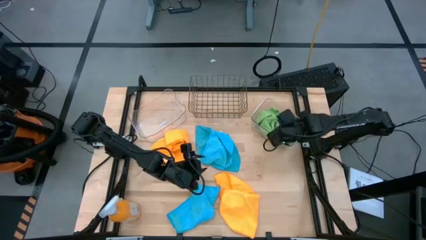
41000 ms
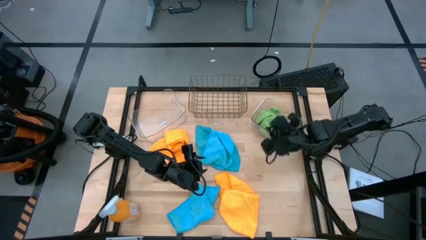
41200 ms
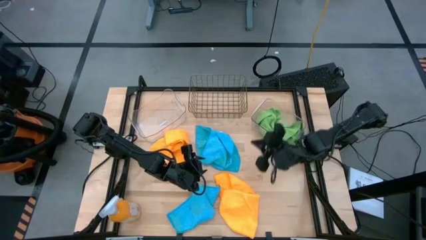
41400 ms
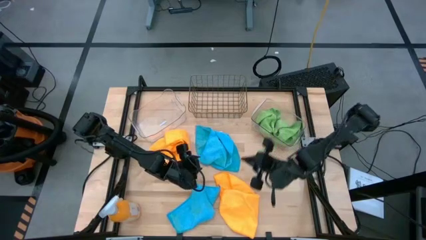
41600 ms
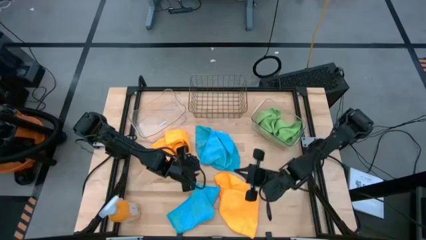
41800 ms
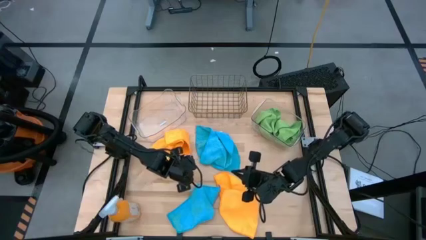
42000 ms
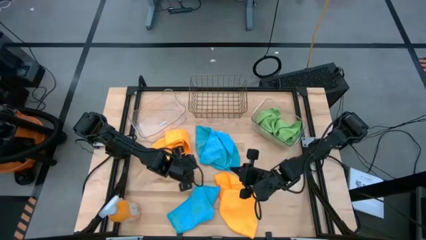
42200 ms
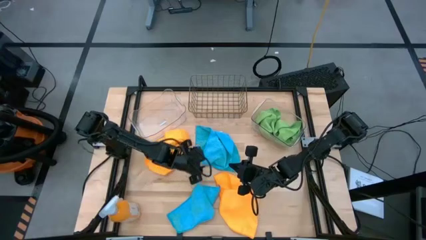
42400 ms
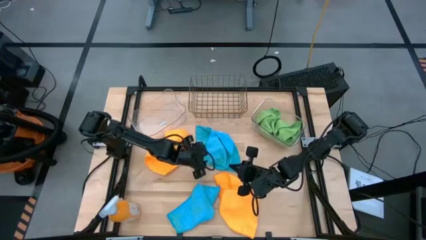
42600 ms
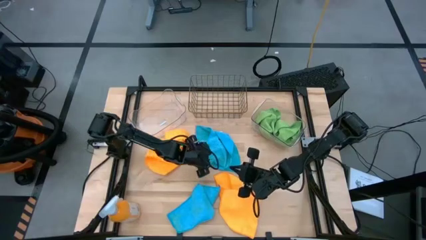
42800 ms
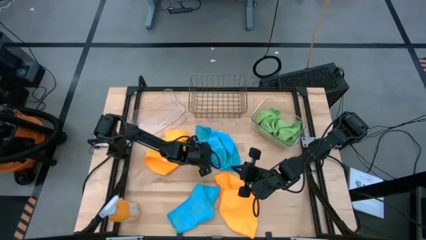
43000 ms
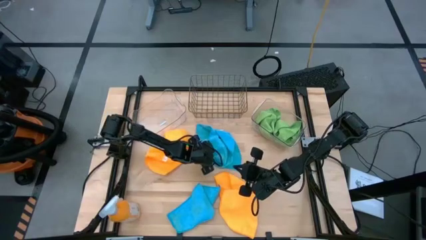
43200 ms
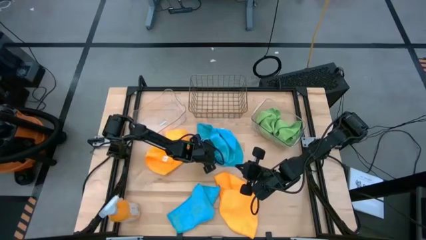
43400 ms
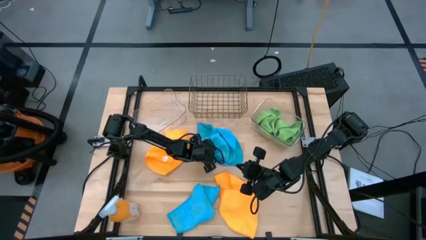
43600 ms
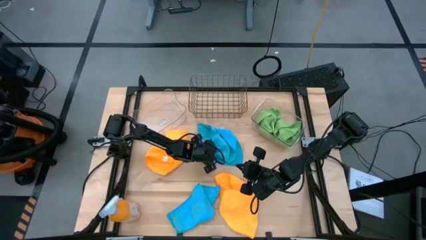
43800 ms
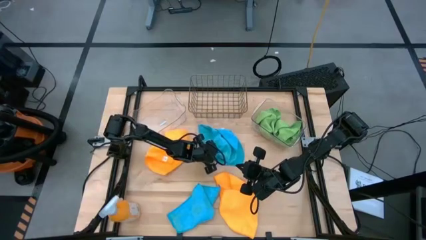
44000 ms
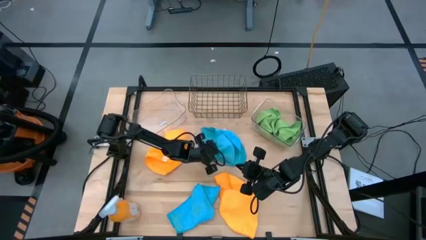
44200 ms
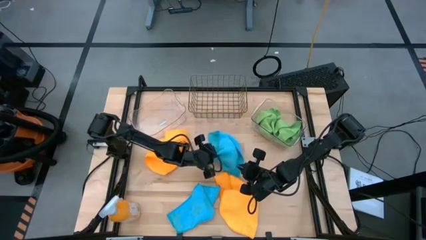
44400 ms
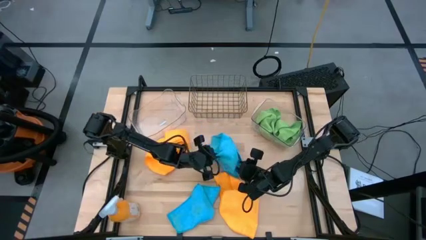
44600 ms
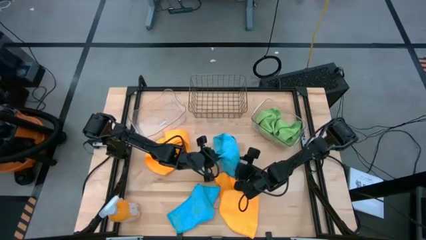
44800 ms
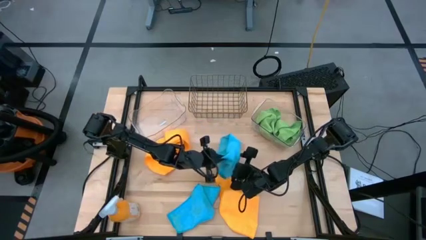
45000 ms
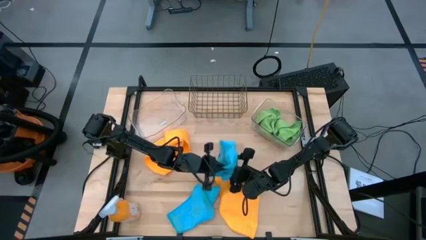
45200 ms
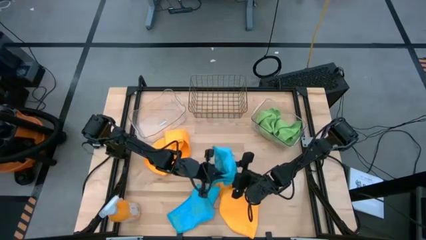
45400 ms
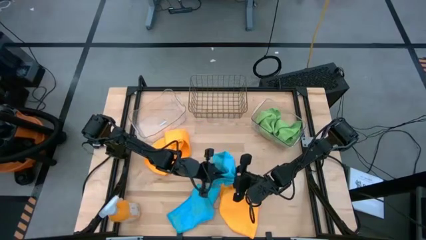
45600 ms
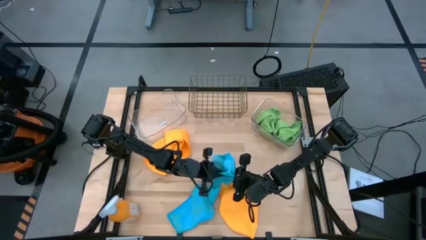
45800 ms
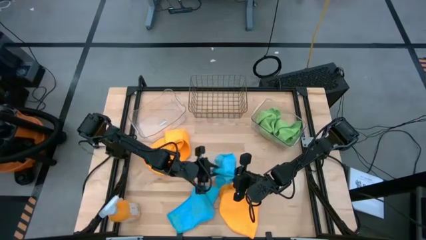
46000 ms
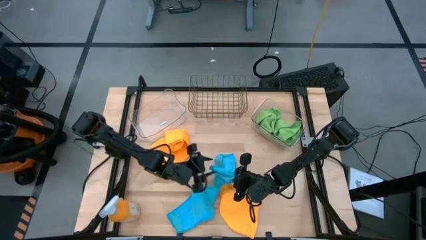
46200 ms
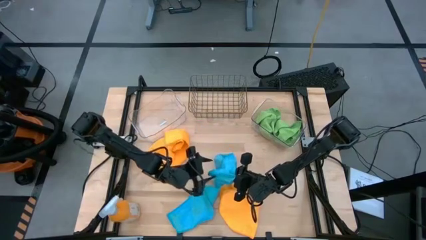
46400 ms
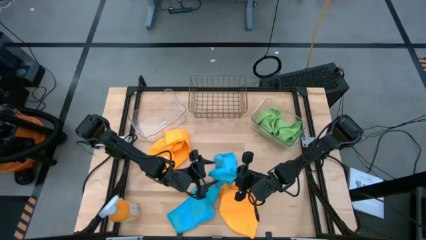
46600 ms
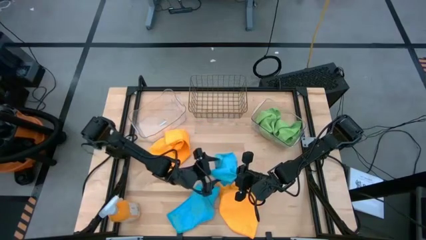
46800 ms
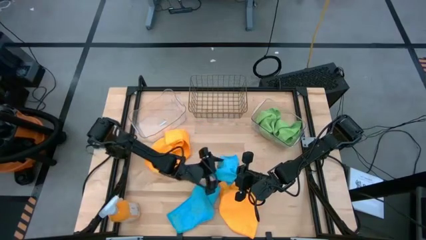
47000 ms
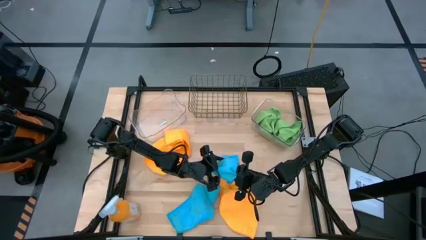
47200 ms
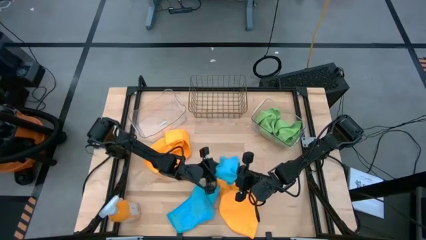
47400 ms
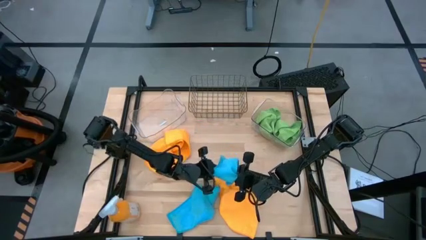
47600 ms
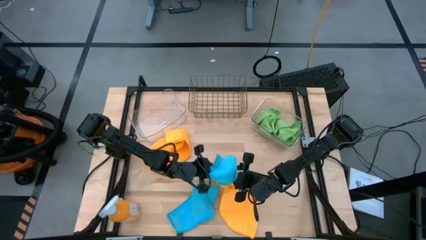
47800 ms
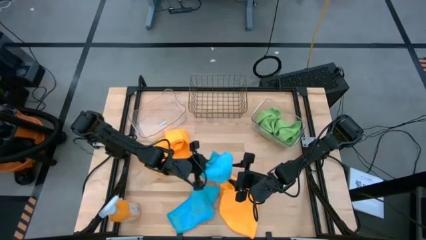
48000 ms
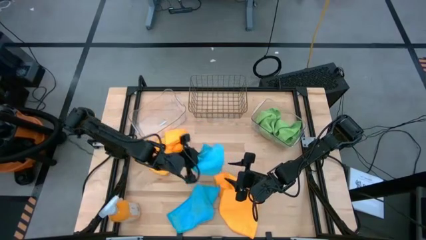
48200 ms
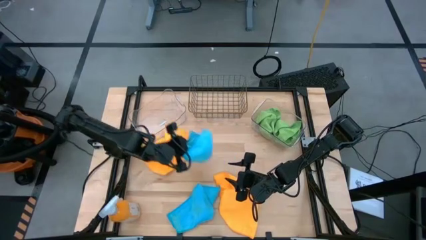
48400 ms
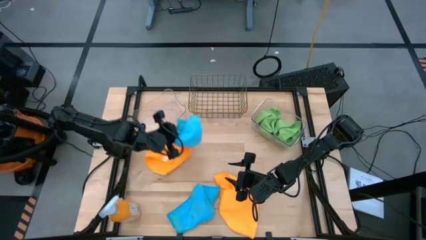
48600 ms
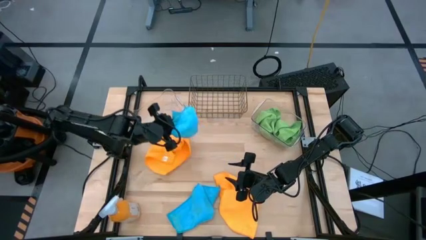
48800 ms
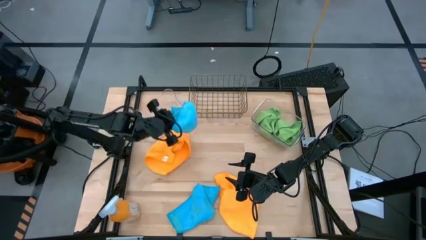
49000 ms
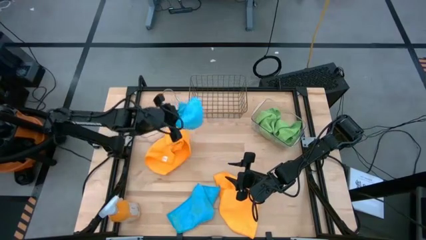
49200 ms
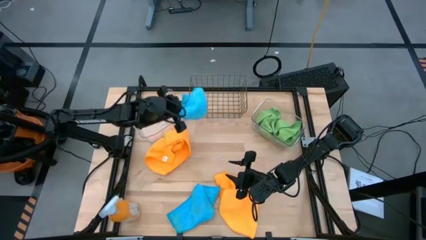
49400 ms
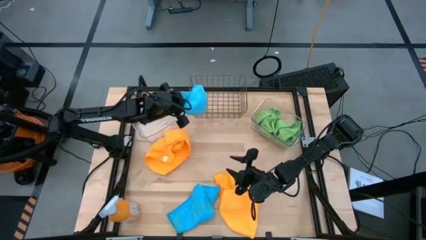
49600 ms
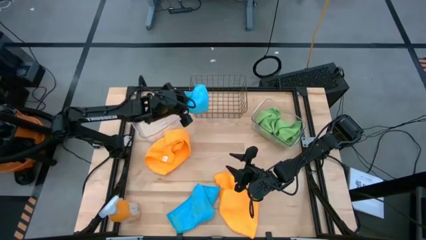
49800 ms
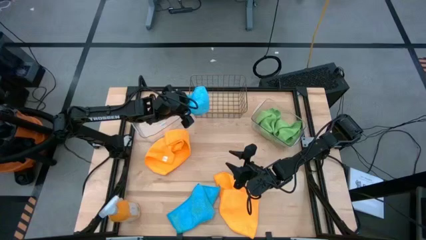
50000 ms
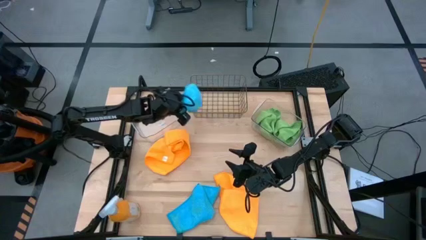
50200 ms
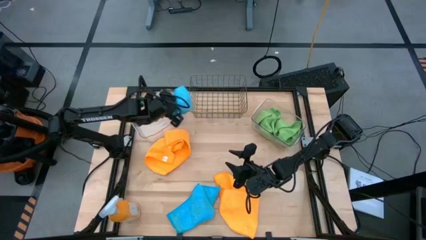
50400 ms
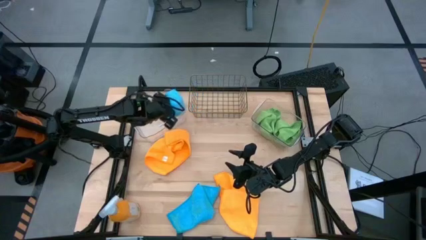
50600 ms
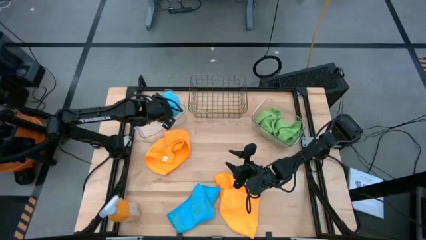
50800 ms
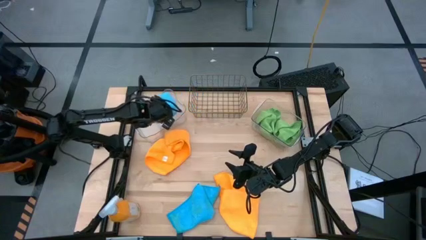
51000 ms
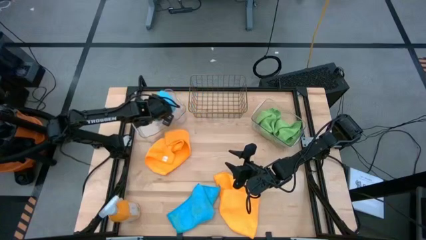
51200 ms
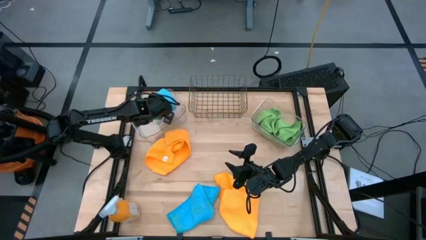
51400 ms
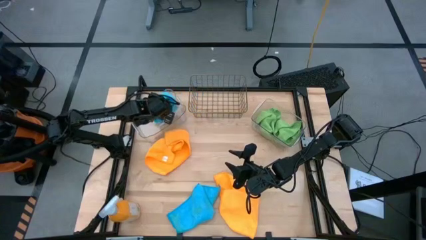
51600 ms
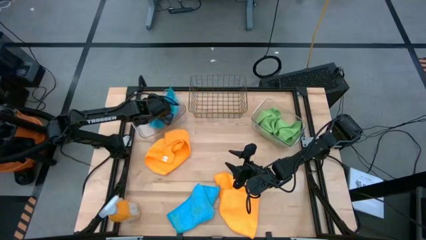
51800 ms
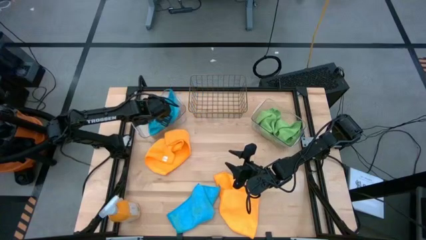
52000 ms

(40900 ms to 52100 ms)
Task: Sort microfiber towel by color & place in baskets
Put the center blue towel into the left transparent bin

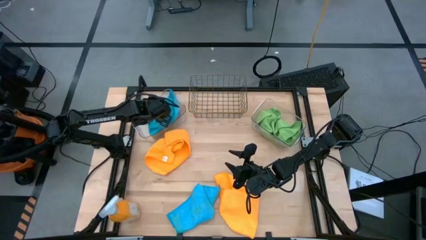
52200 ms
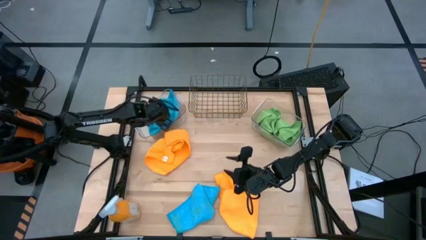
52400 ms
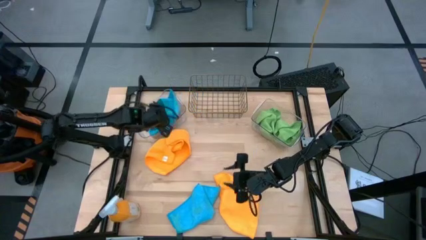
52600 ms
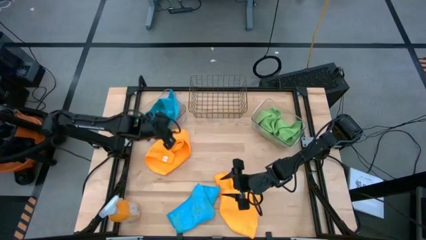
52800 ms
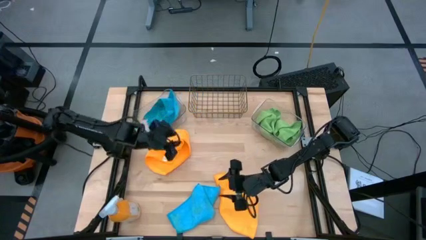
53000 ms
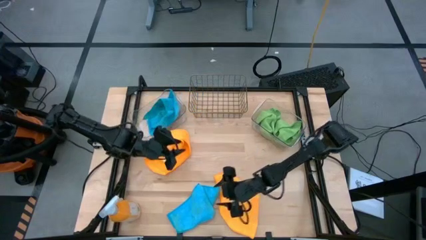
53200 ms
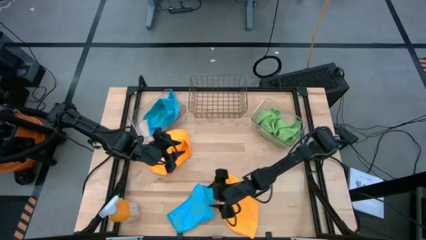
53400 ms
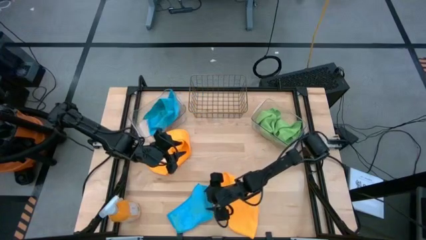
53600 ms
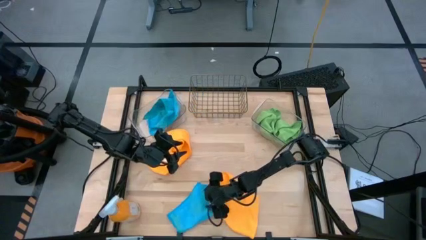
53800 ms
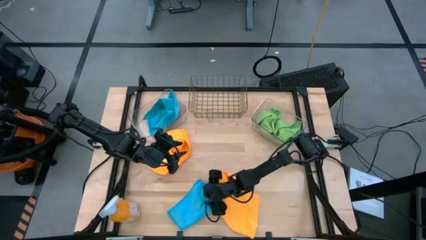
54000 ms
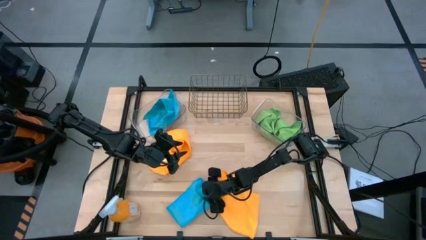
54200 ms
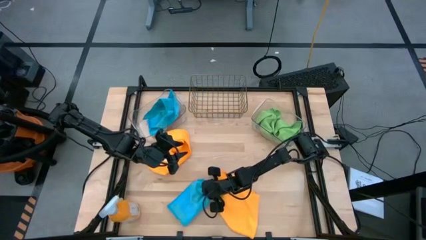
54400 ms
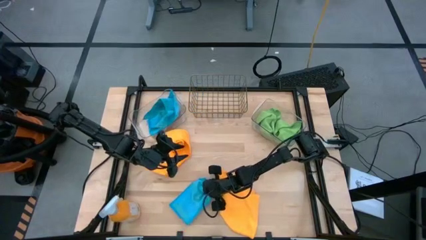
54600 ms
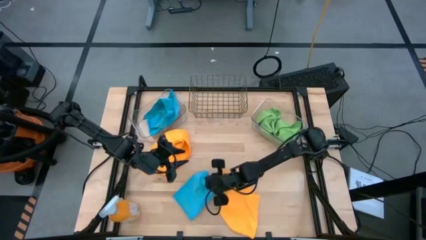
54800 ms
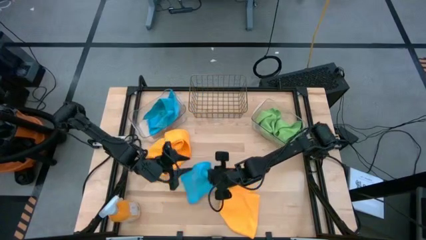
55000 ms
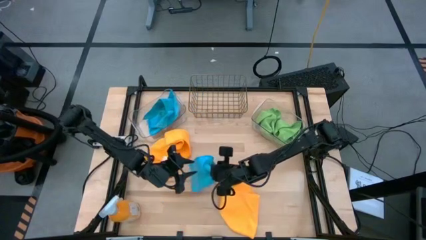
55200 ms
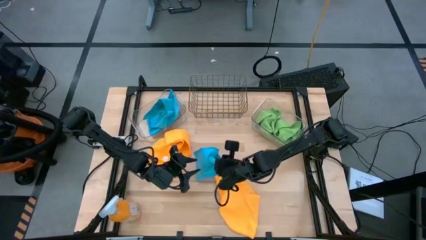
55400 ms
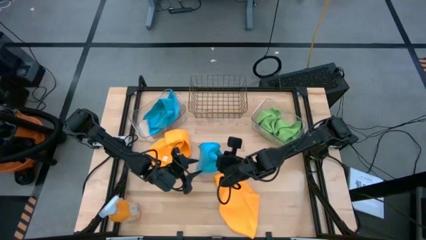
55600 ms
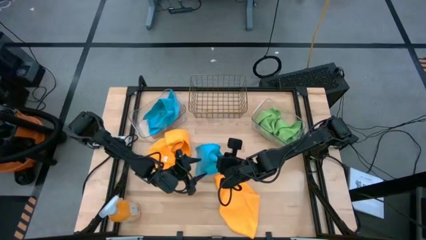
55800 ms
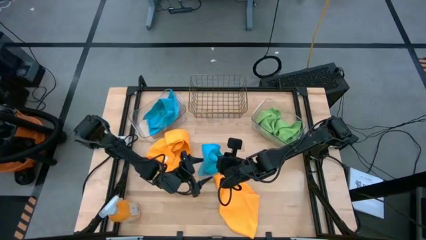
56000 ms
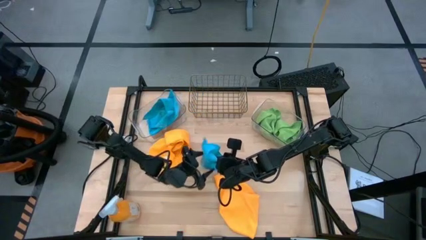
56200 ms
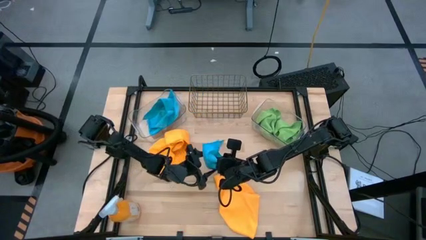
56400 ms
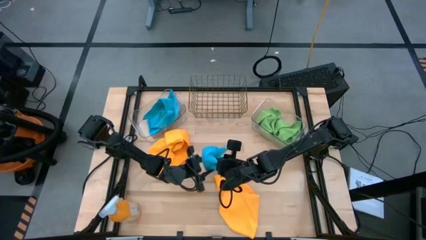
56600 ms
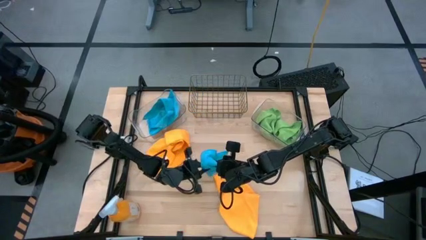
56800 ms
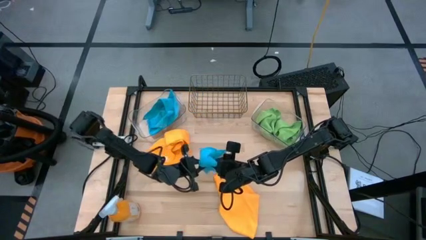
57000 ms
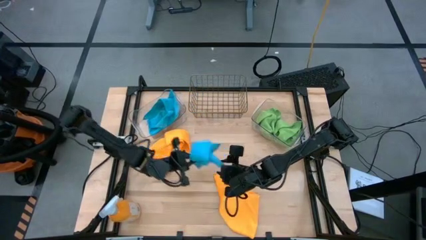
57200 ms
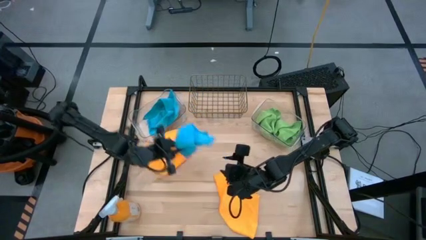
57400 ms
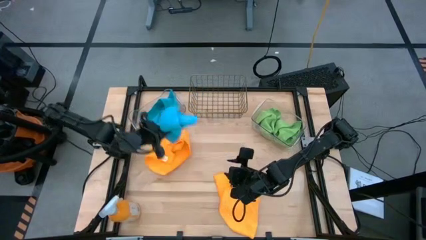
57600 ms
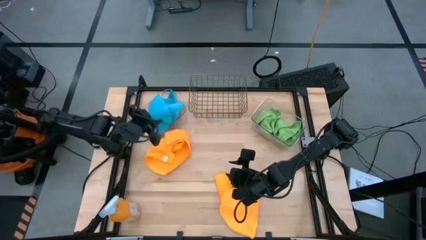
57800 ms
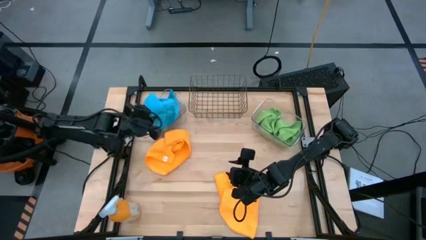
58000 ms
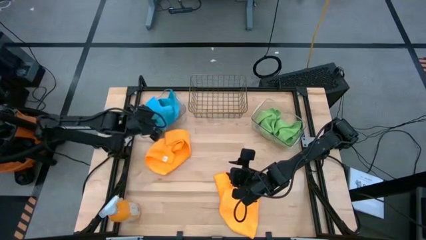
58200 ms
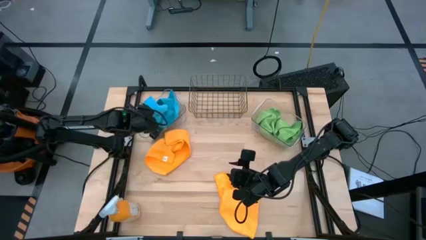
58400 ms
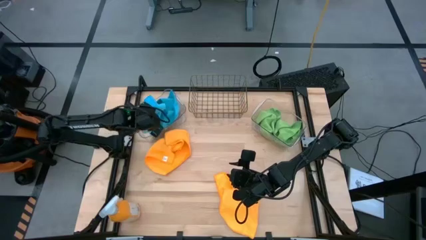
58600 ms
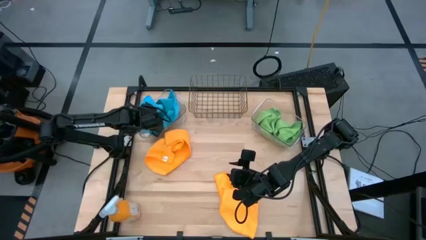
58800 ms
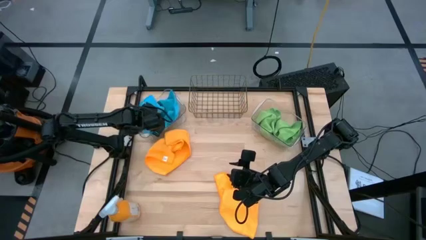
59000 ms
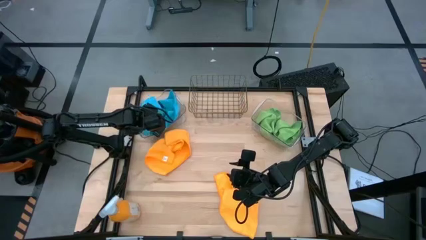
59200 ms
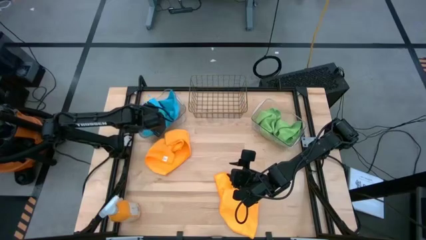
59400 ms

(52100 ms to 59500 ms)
Put the blue towel into the left transparent bin
